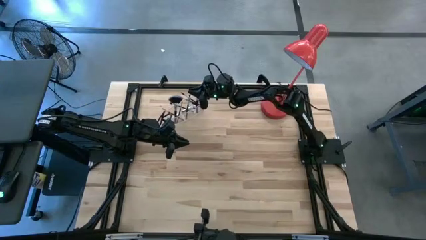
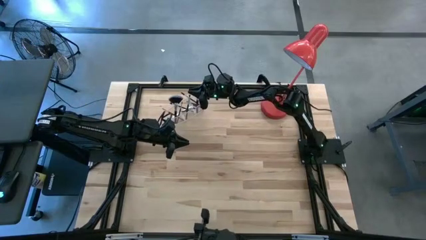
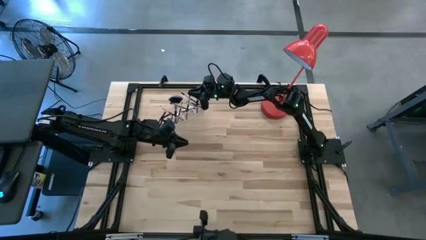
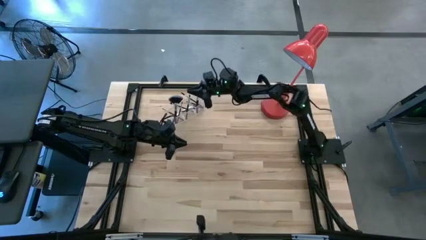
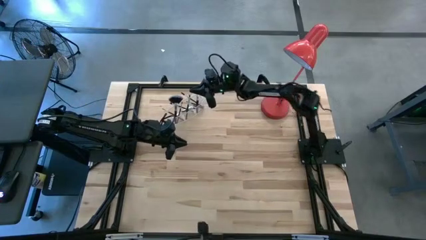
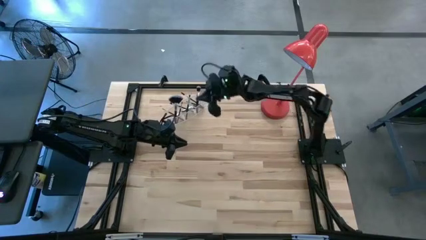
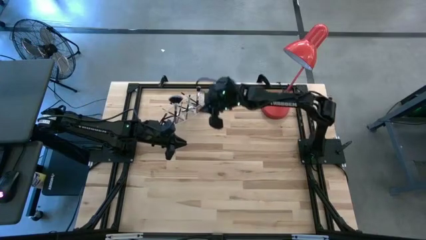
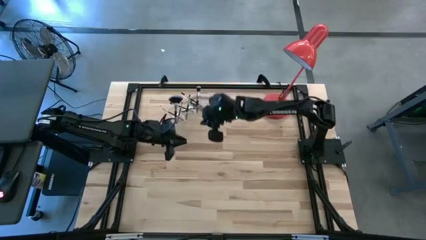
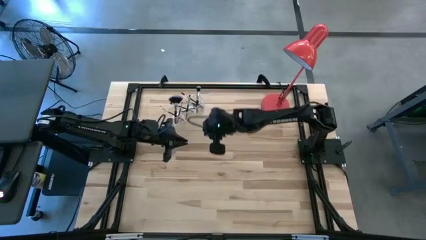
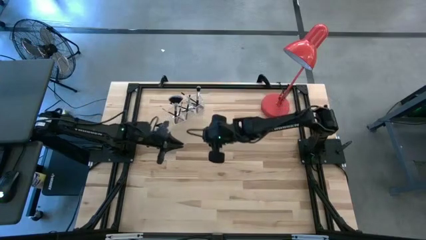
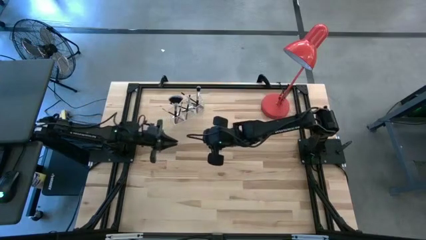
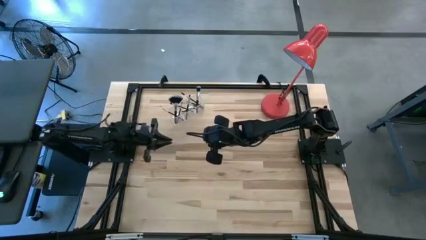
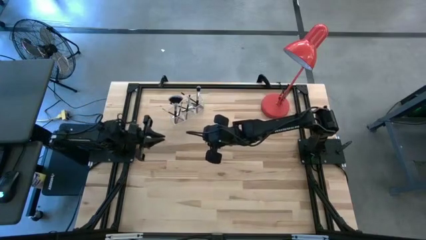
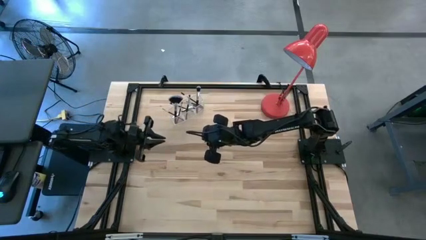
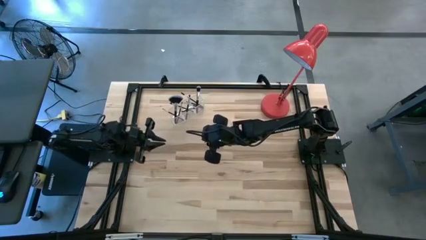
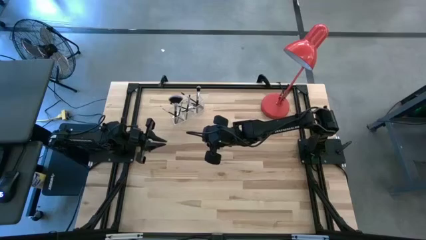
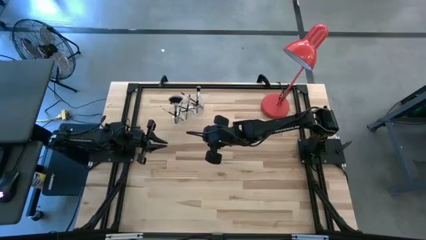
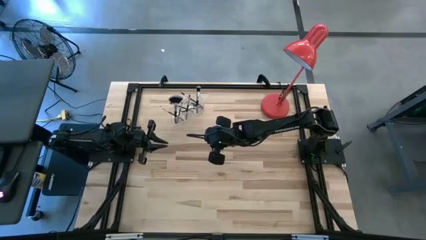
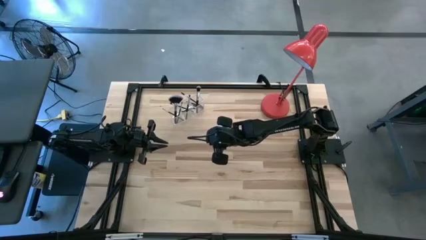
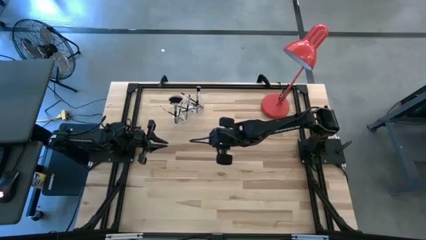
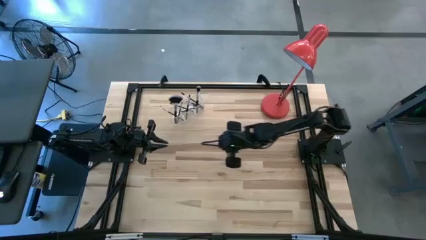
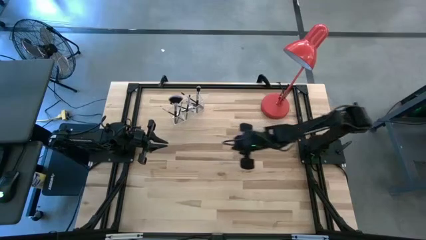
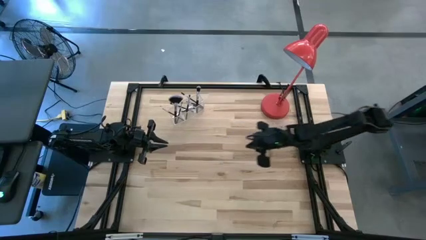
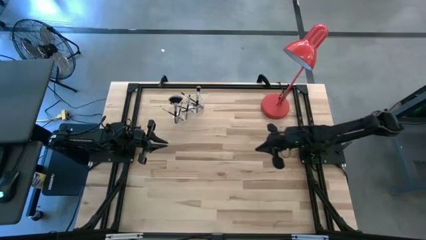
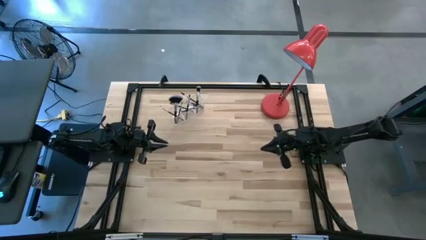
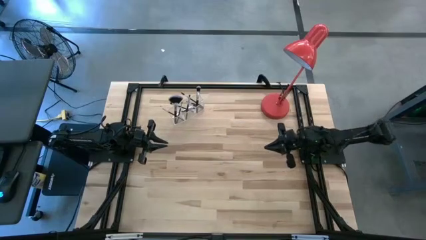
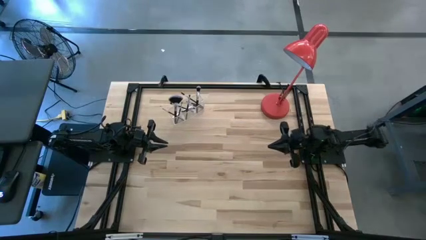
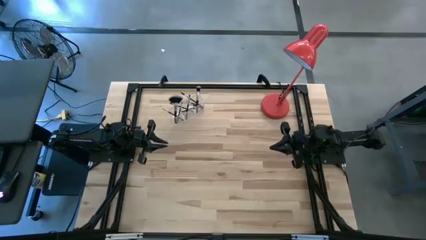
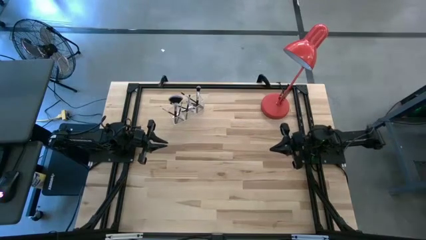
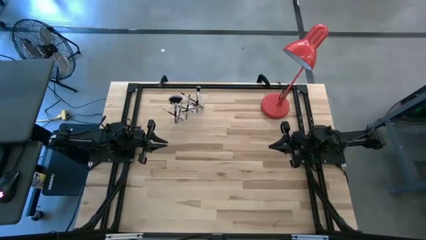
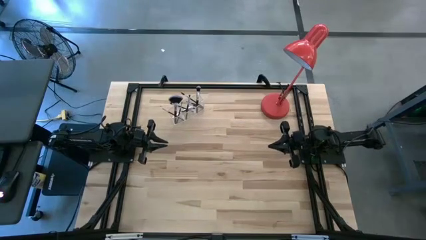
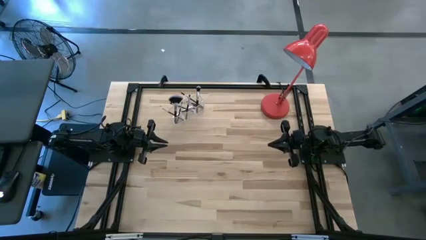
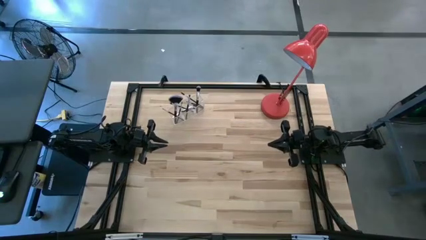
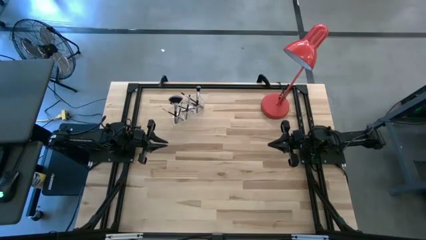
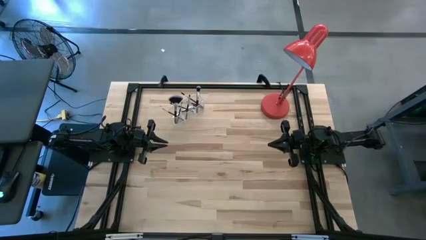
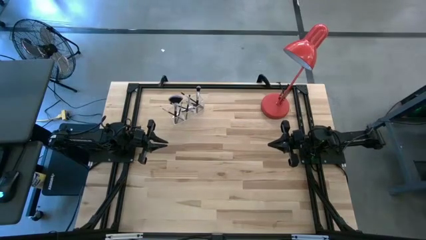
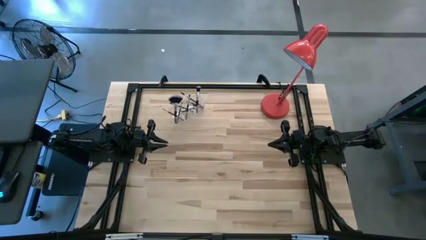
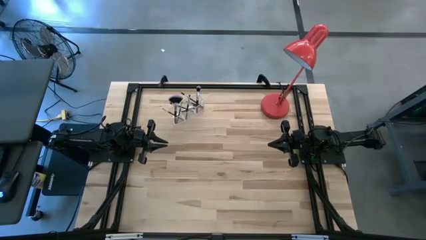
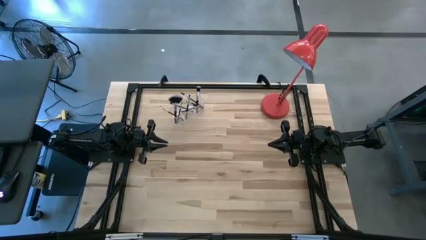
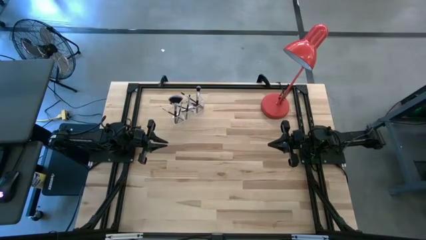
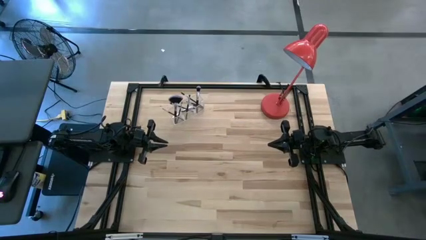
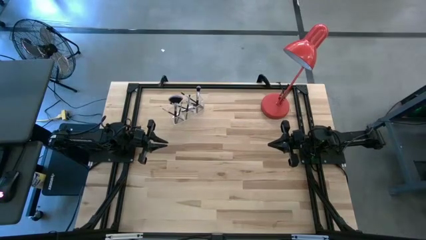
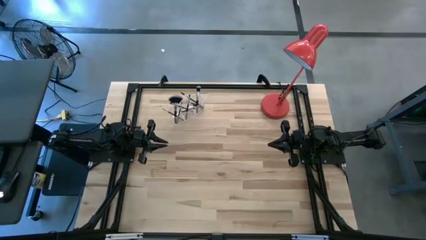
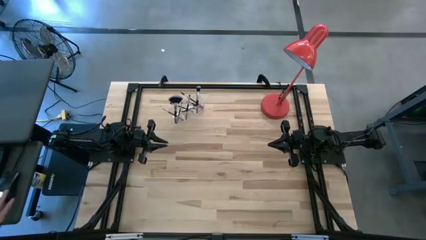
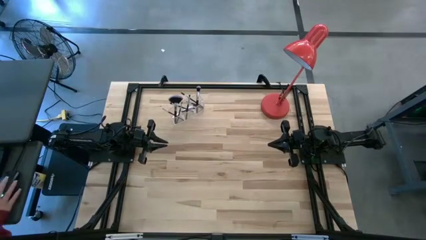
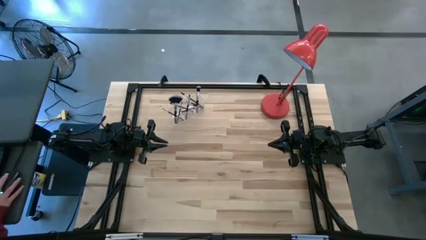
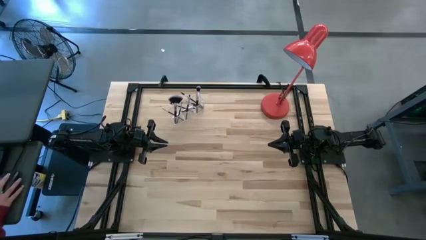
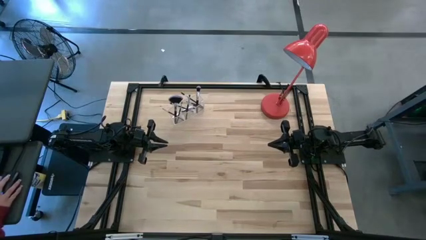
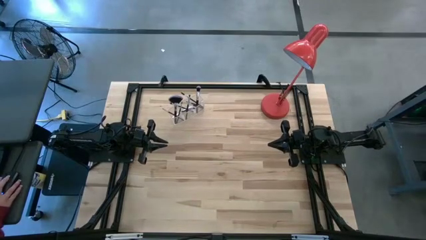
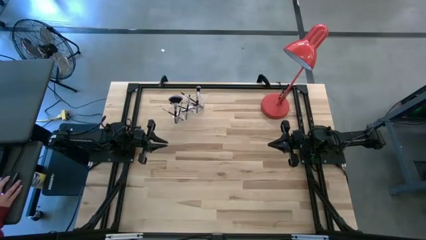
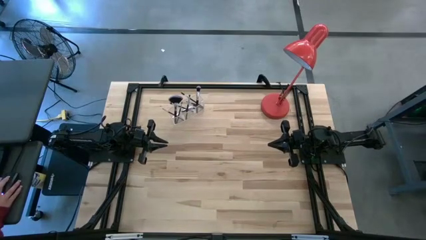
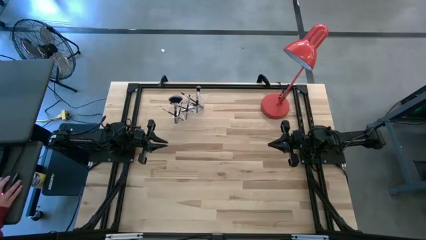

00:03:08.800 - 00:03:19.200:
Task: Put items in baskets/containers
Return to Home Position

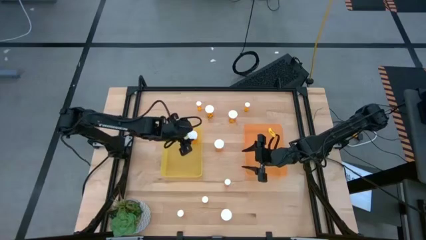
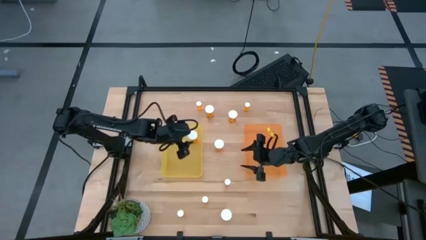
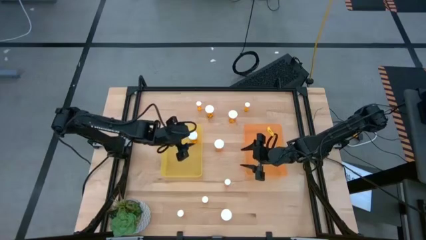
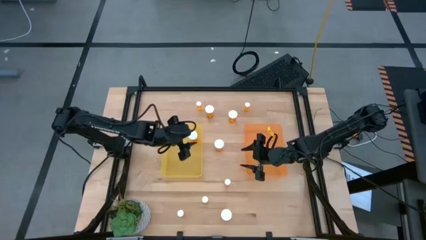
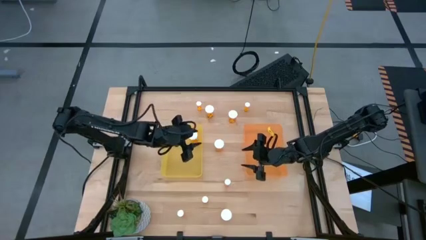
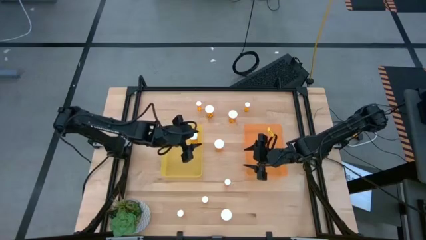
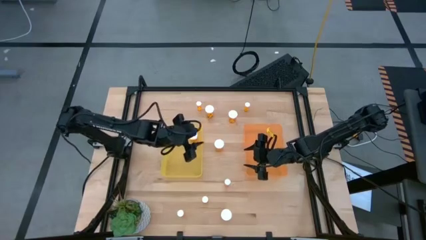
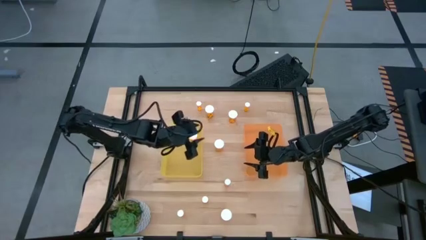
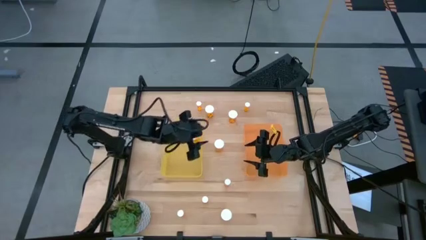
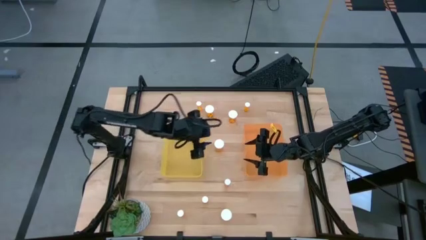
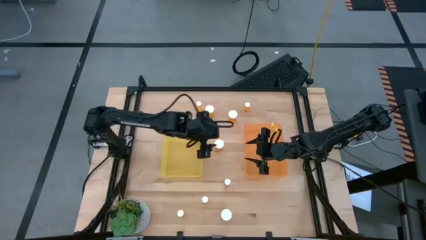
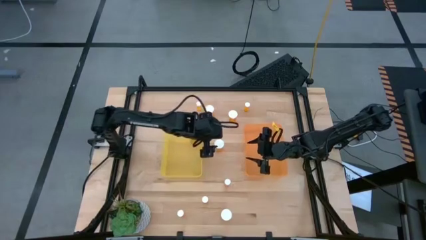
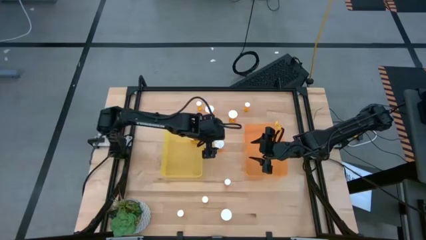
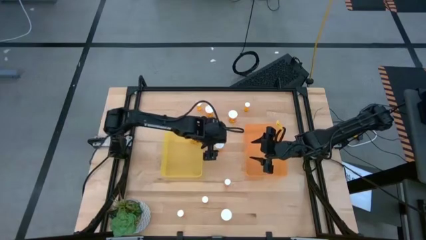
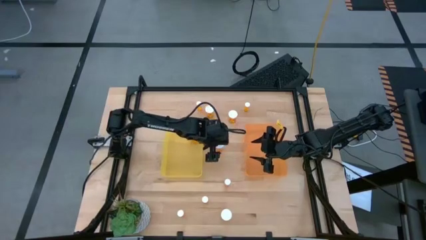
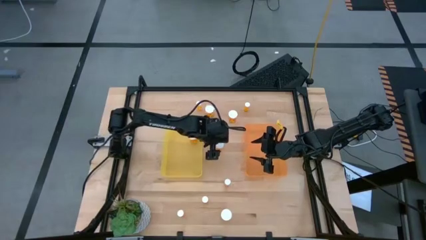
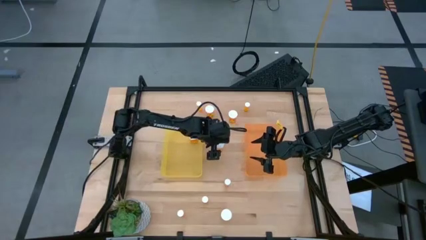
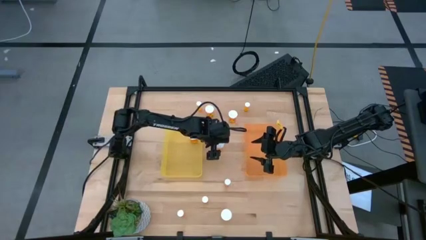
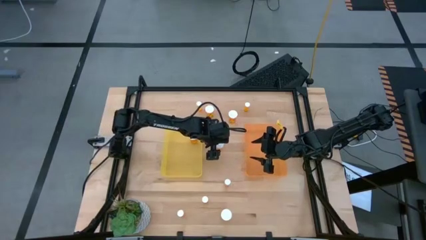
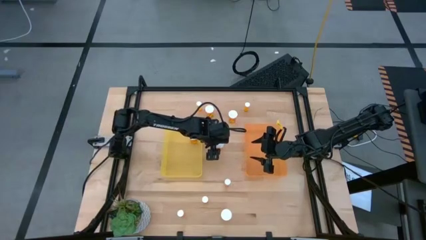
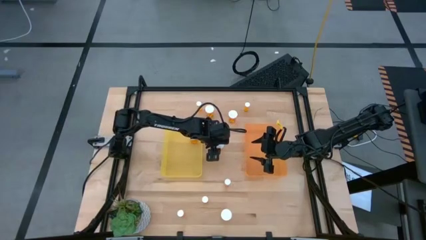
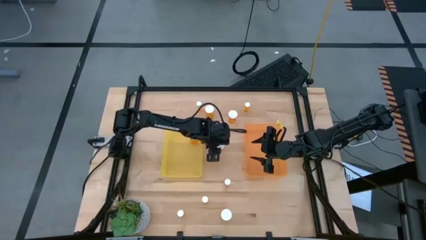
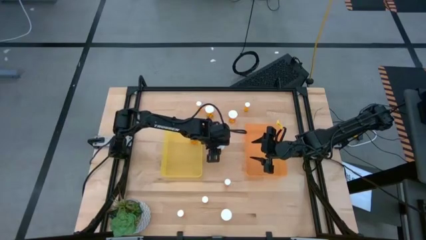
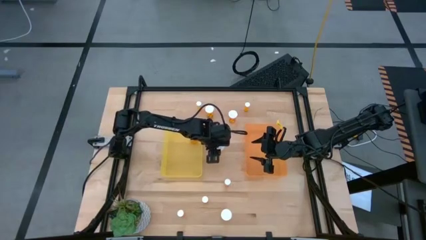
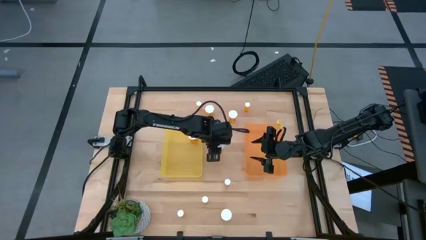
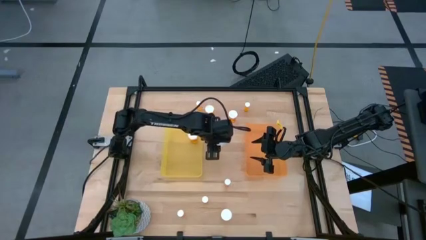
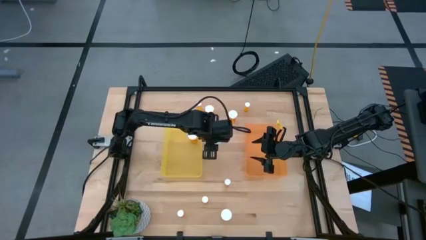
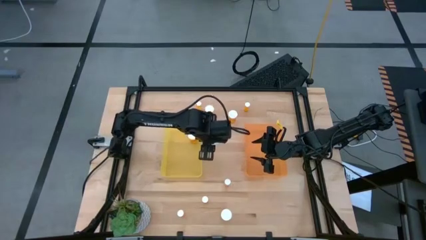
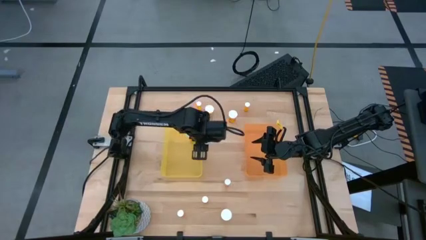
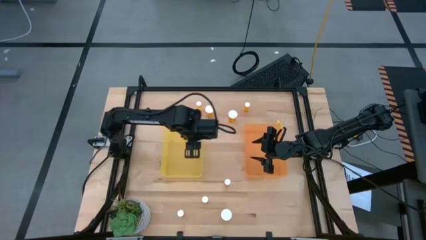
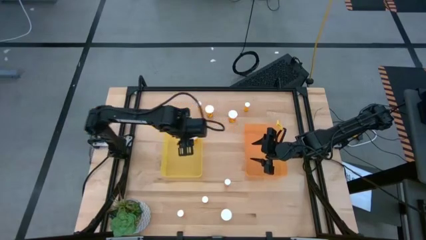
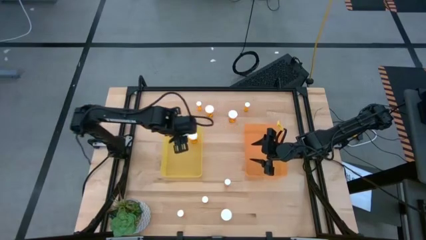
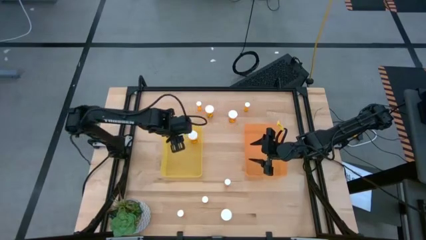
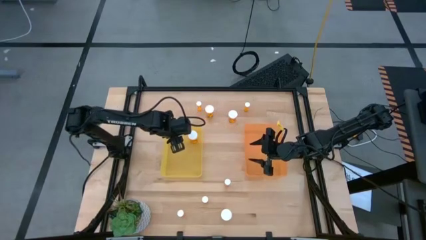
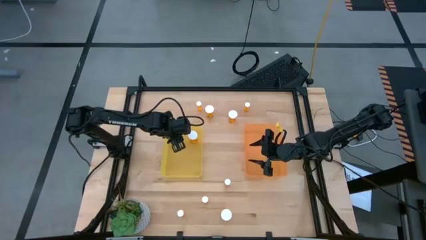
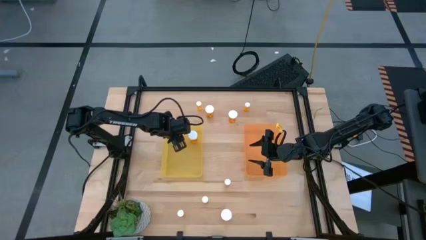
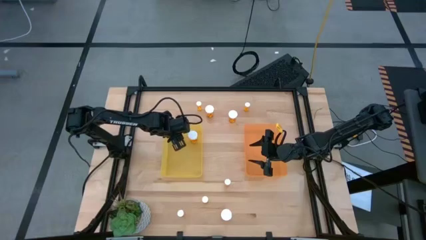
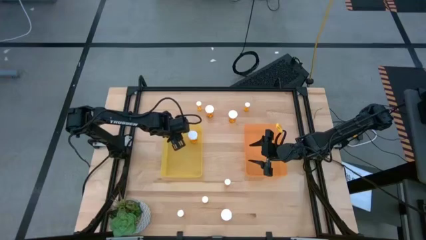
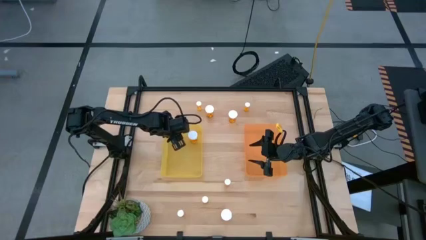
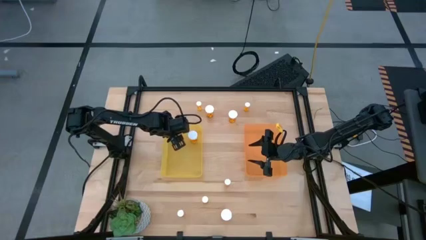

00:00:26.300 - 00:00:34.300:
Task: Pick and place medicine bottles into bin by pill shape (circle, oval)
Put the large orange pill bottle into the yellow bin
